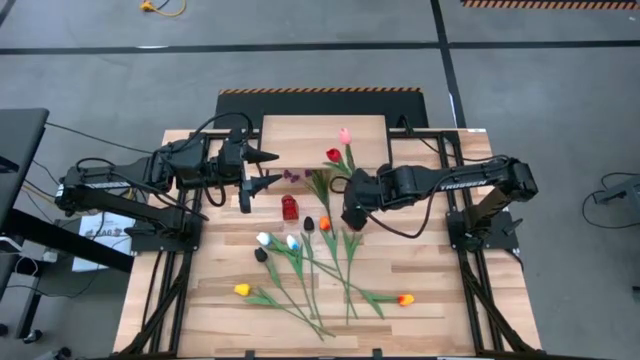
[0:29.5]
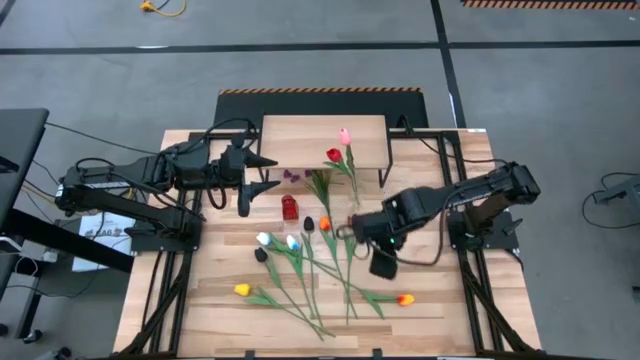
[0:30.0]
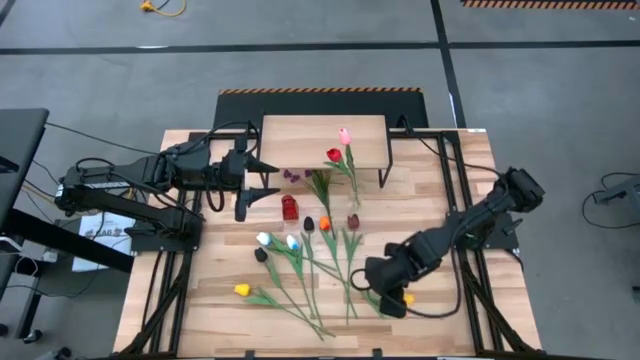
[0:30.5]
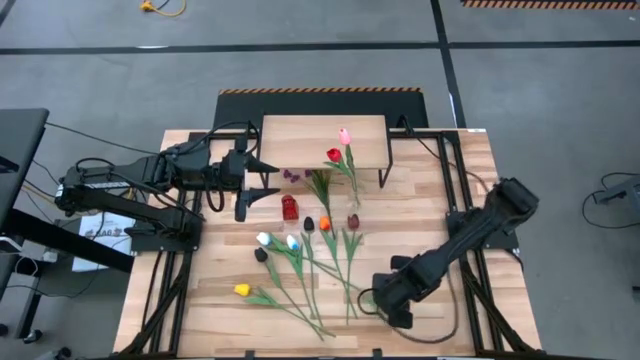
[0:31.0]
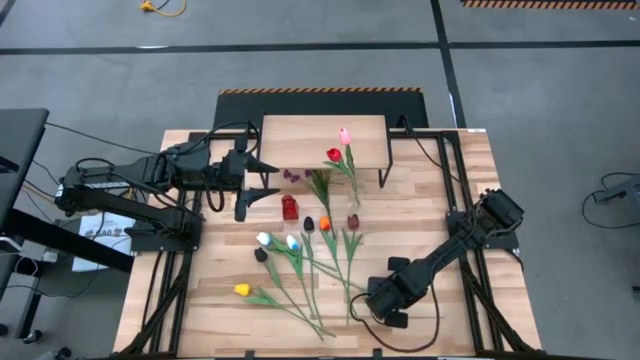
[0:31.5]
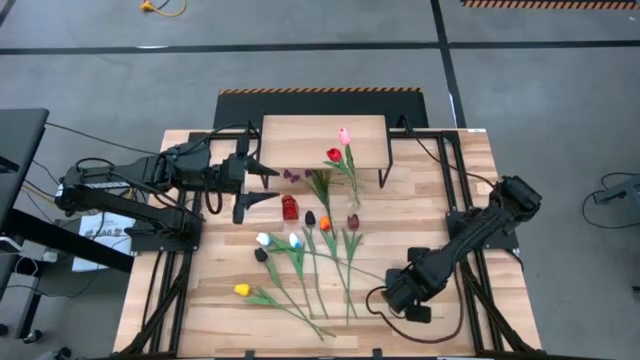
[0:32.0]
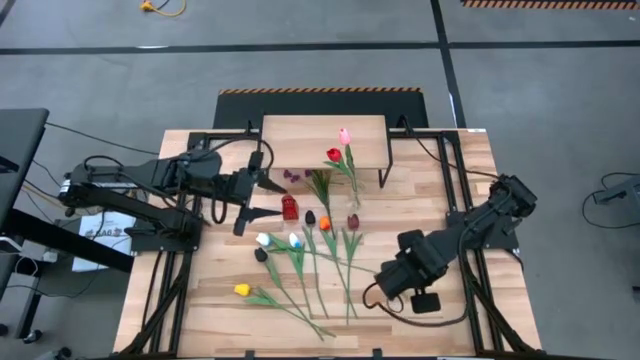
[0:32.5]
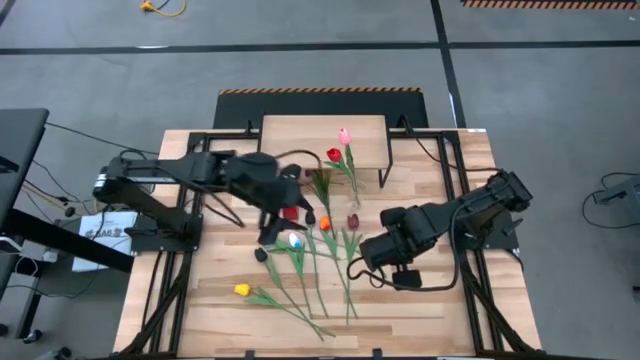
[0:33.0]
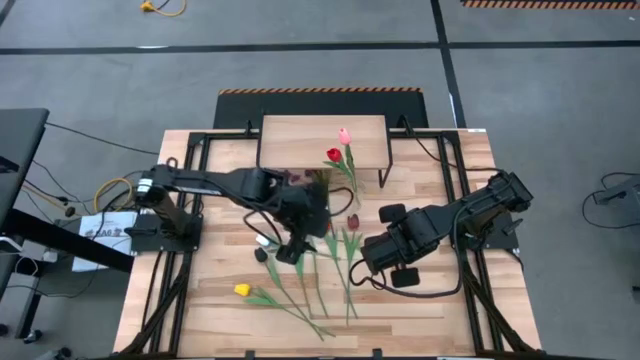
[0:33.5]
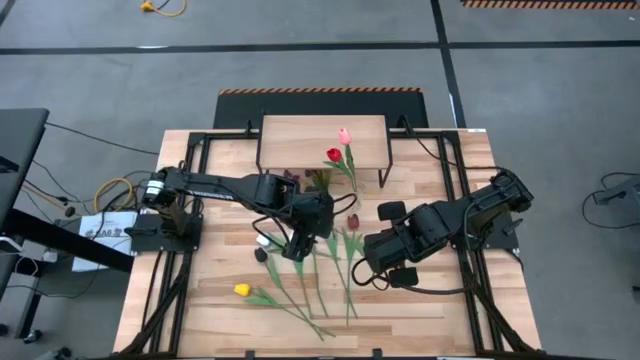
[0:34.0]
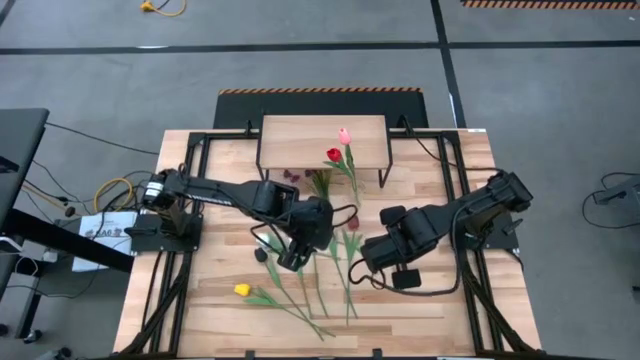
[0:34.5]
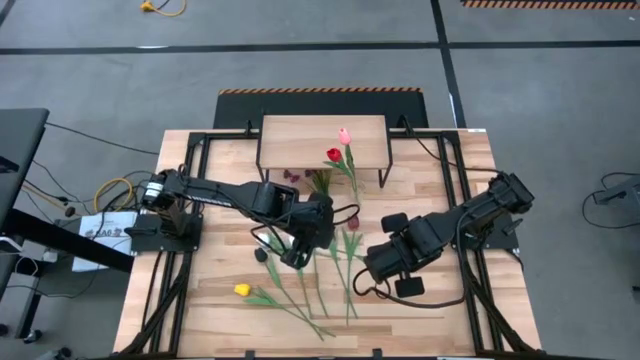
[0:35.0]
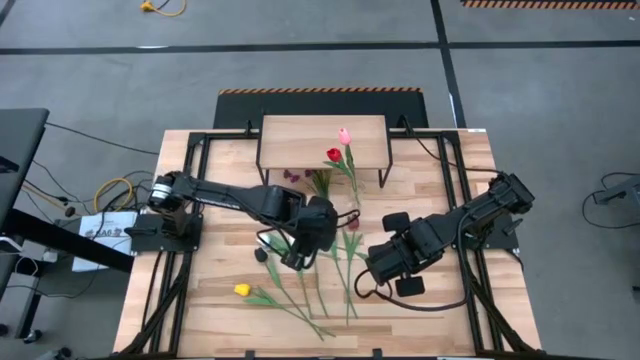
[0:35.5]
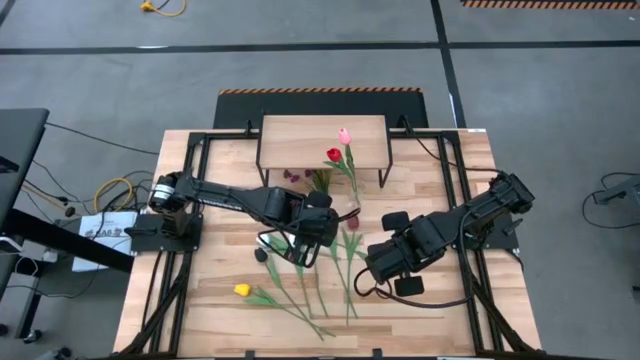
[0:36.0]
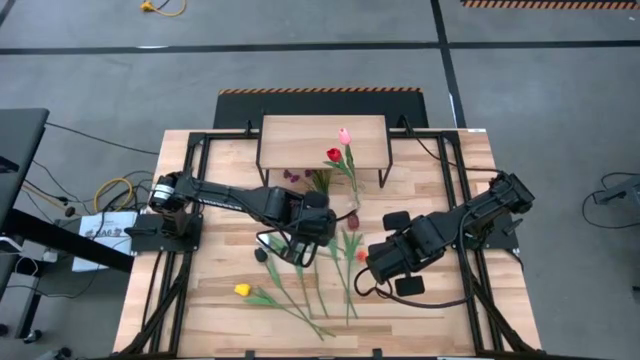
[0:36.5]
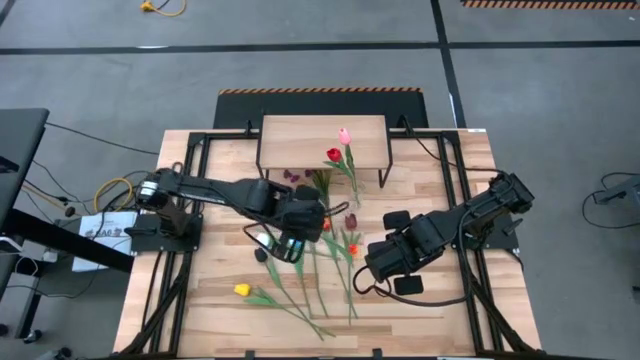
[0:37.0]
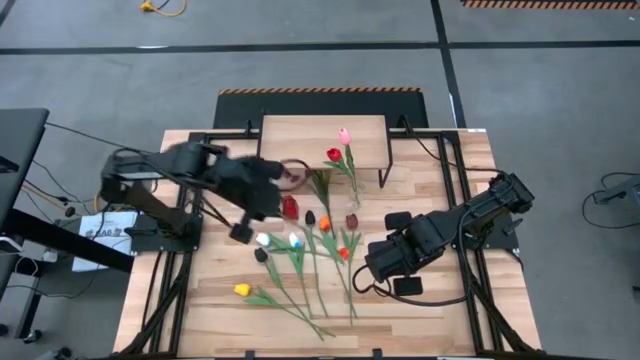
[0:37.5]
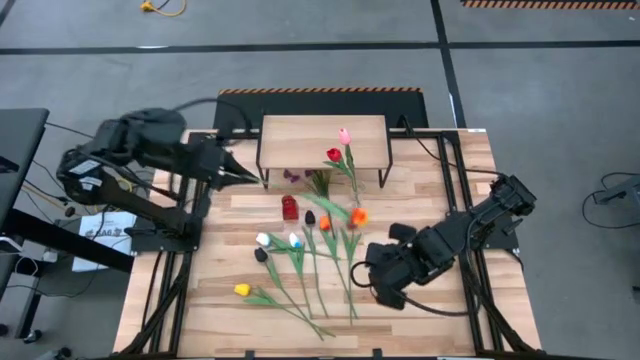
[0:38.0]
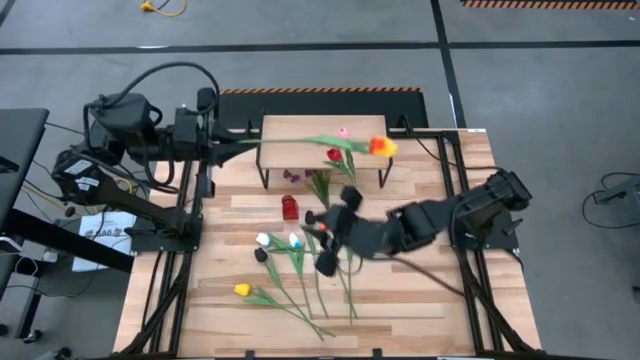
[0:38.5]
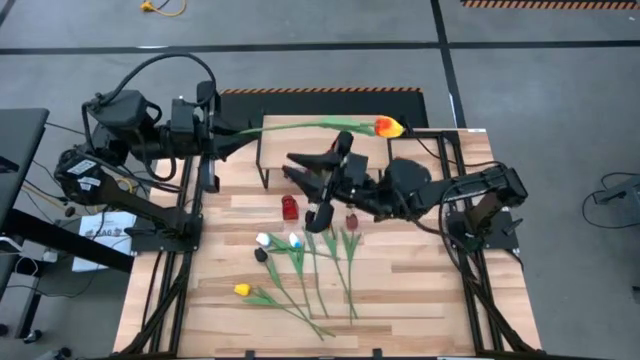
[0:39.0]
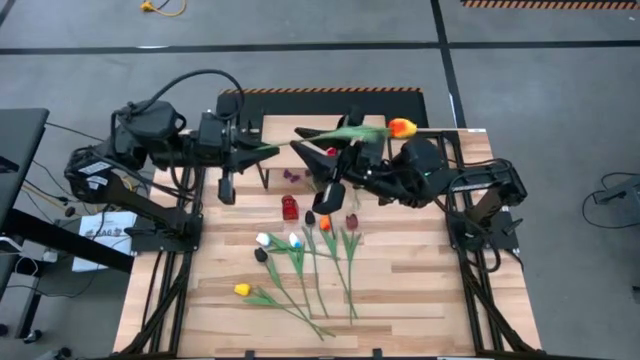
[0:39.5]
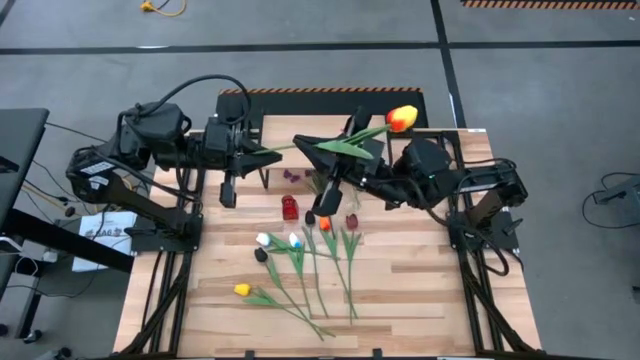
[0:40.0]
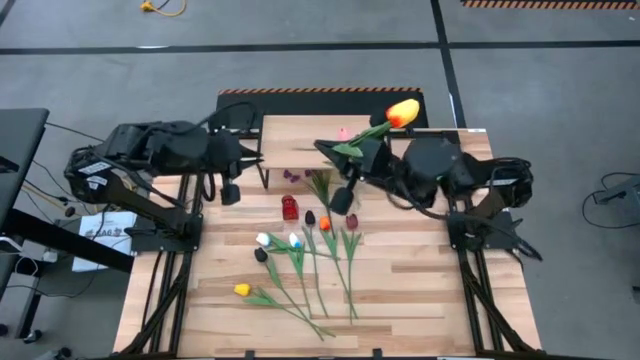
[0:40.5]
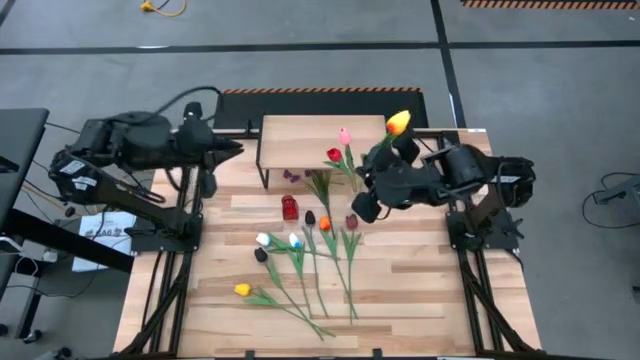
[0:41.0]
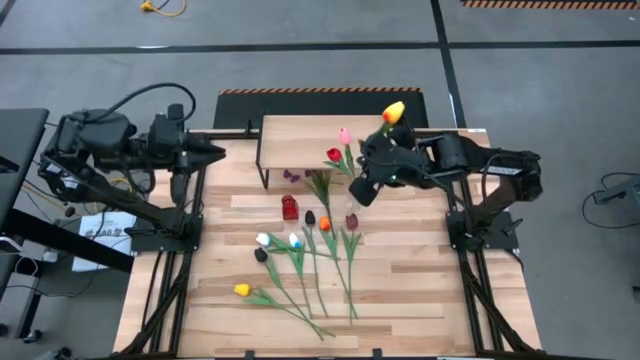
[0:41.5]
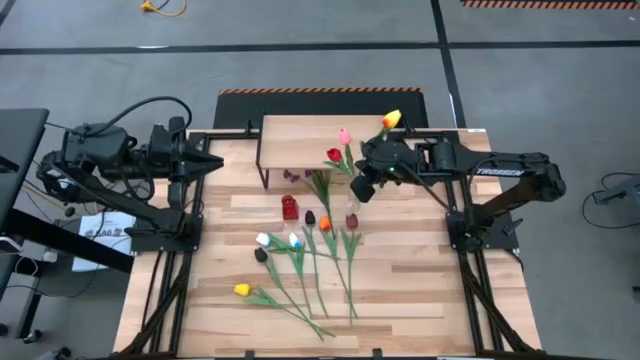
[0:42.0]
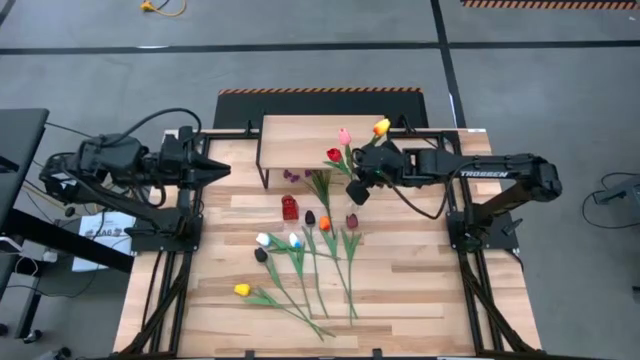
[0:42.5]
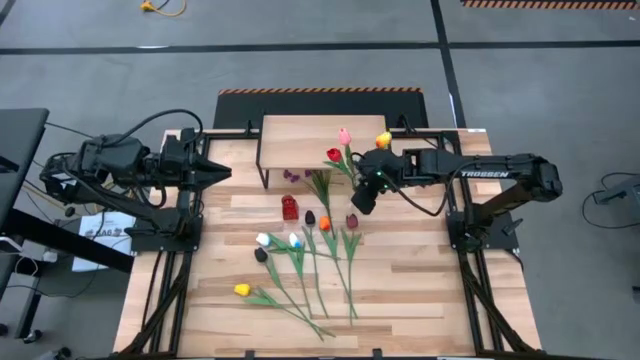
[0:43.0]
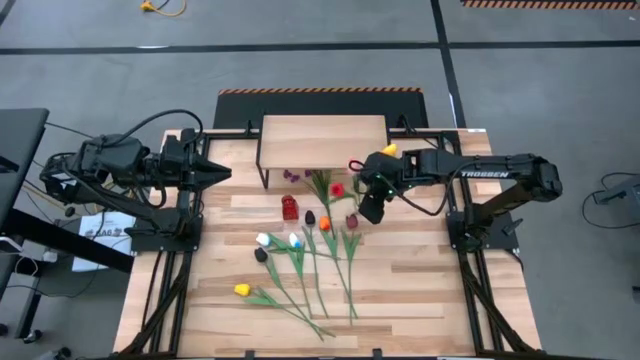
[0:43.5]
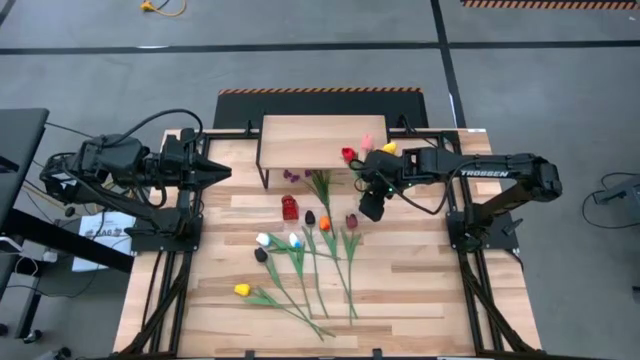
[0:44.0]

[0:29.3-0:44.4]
Task: Pick and place flowers into a vace then onto a shelf
Put the bottom orange tulip into the transparent vase

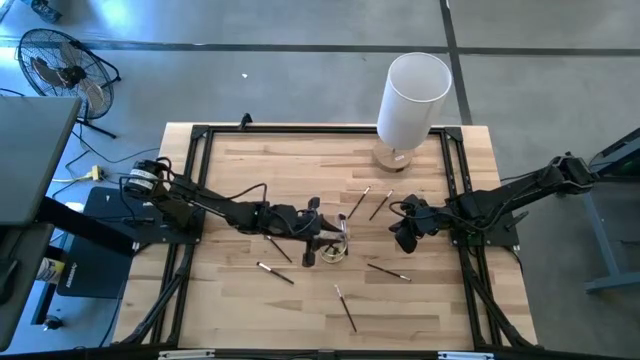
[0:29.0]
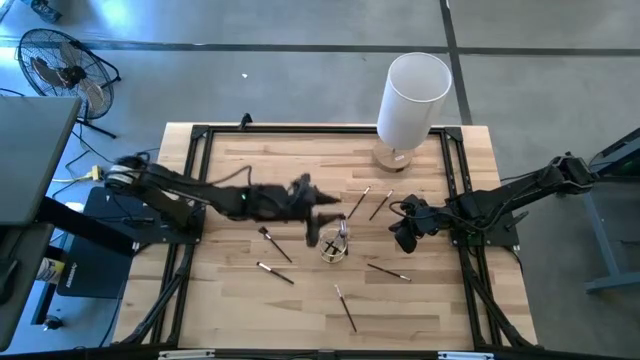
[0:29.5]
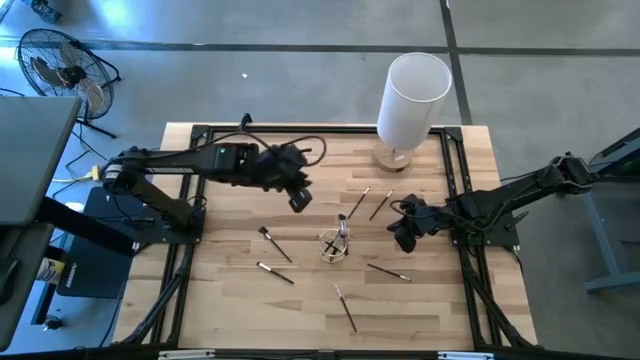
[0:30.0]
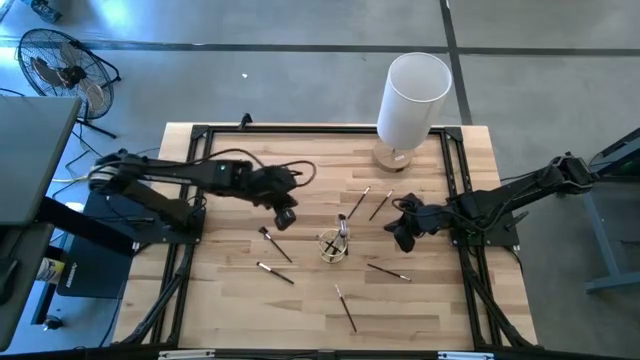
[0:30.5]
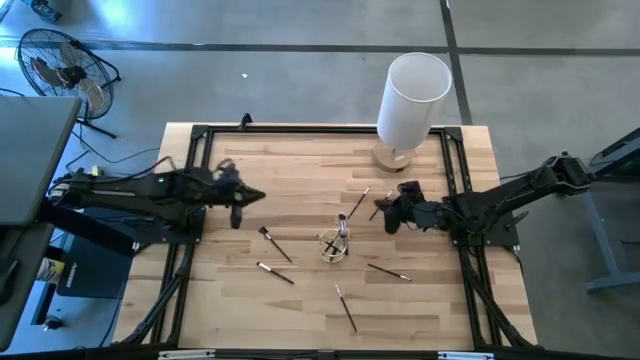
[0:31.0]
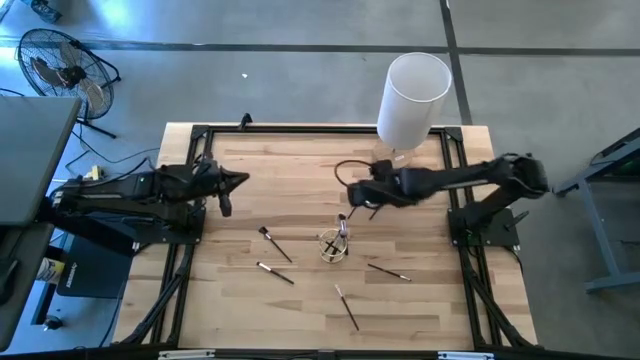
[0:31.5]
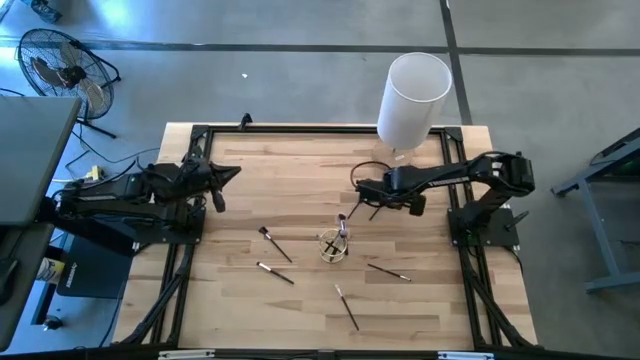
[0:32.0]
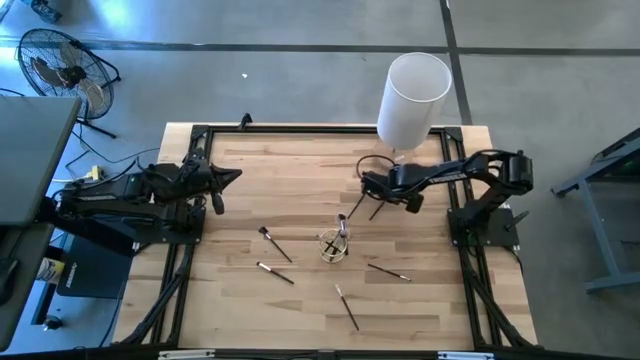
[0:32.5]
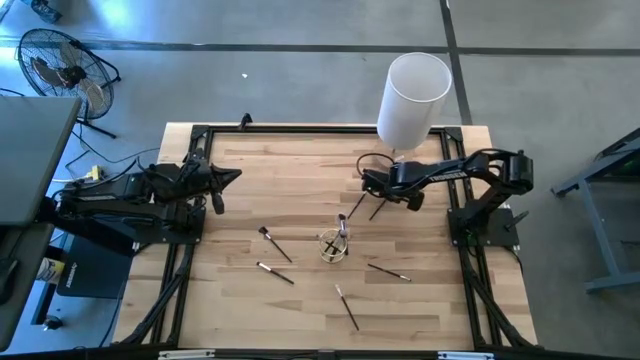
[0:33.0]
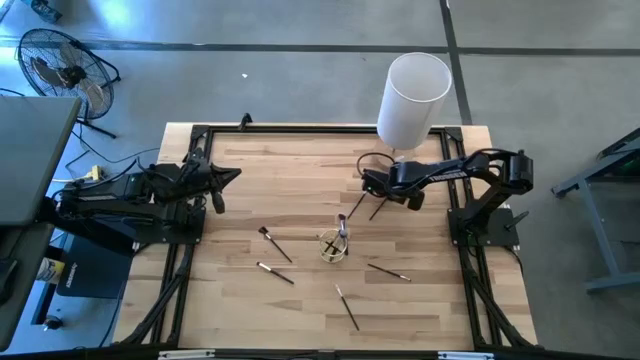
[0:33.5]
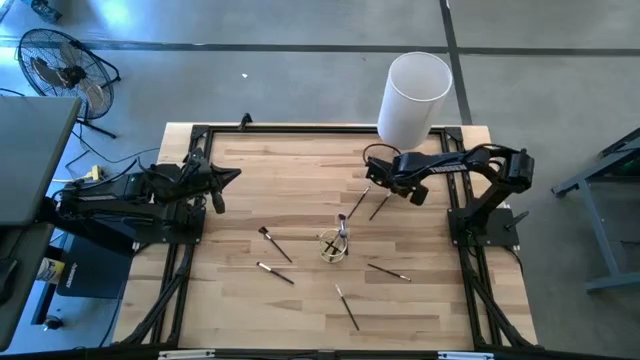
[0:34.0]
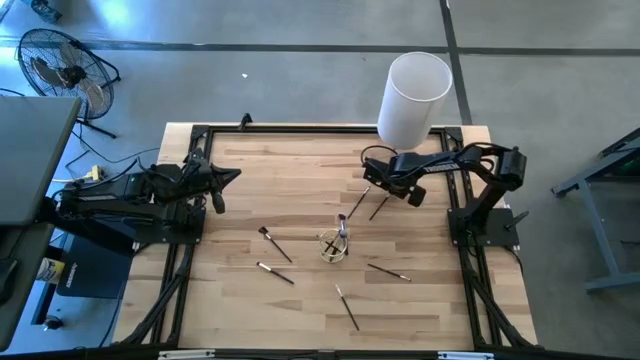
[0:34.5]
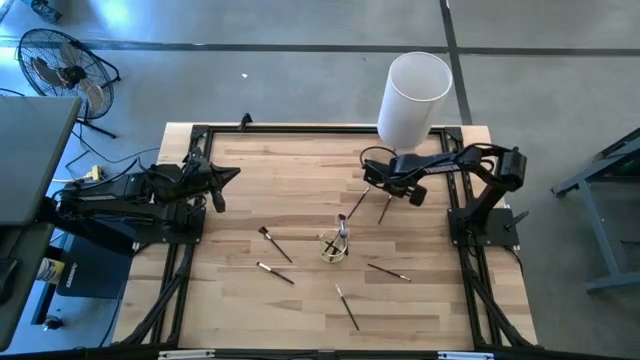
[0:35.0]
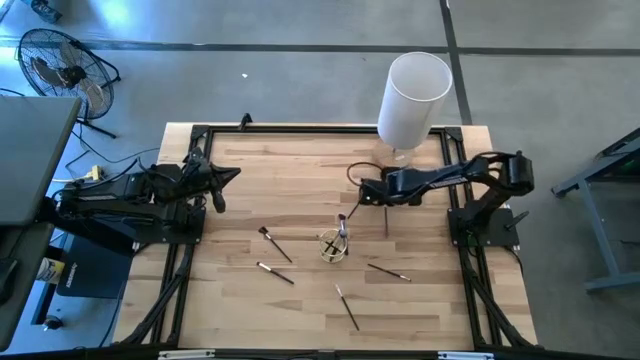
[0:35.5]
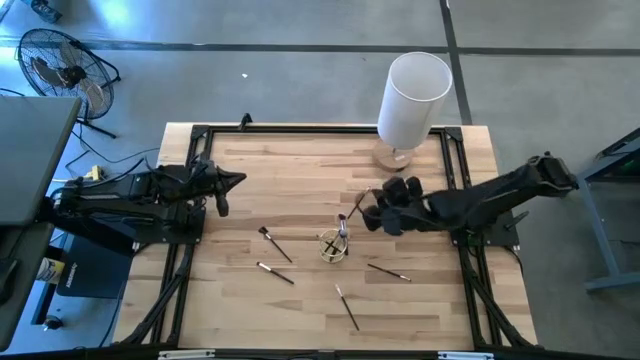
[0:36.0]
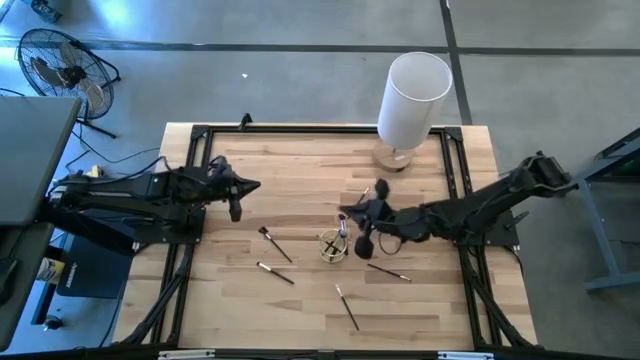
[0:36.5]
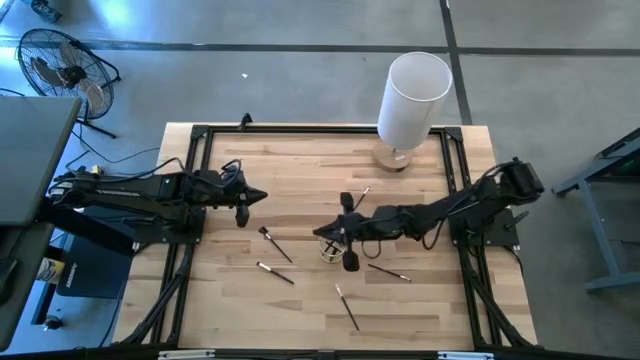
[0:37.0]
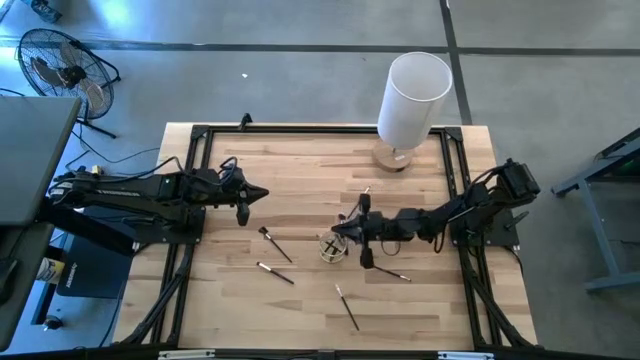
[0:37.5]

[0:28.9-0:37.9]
Task: Put items in baskets/containers
Put the eyeshadow brush into the mesh organizer
